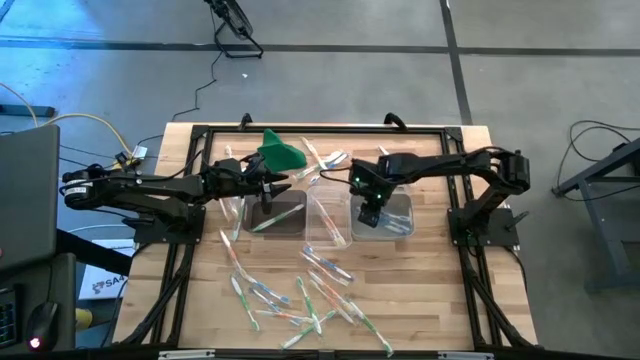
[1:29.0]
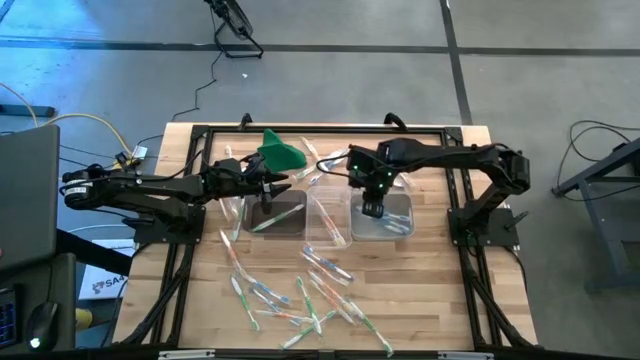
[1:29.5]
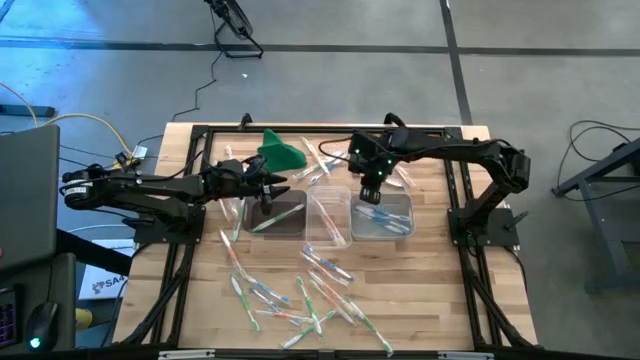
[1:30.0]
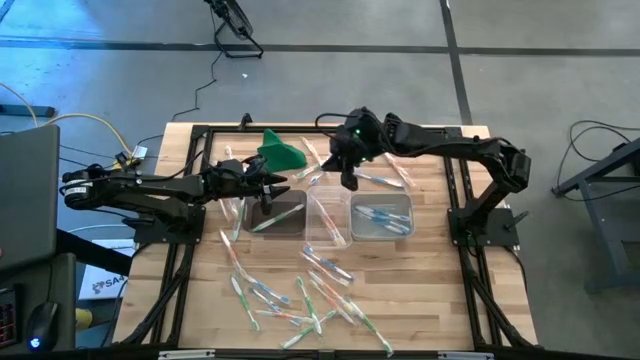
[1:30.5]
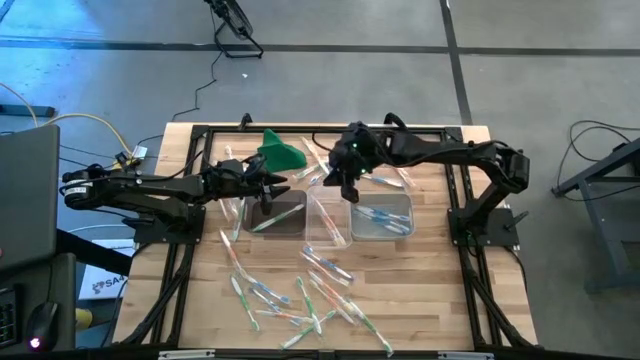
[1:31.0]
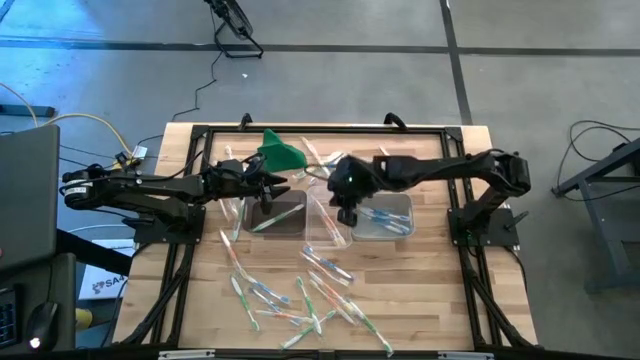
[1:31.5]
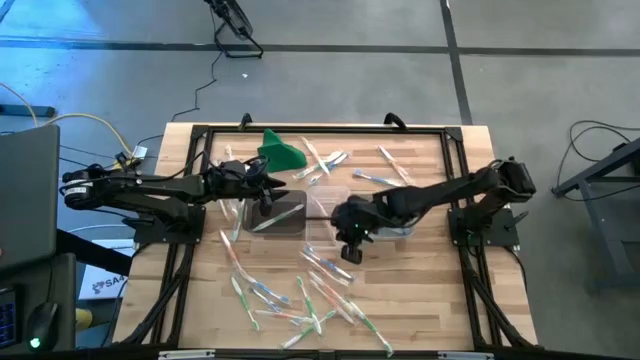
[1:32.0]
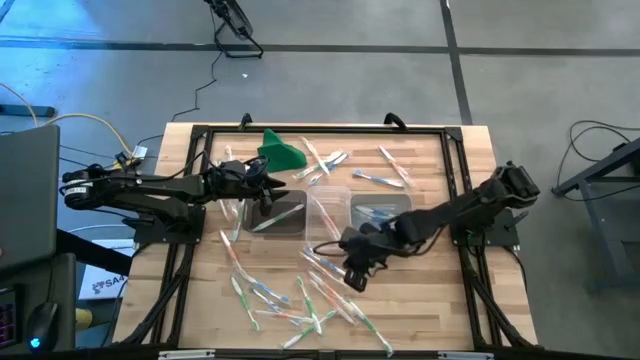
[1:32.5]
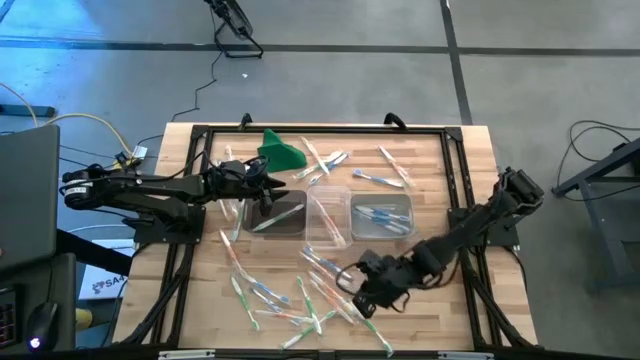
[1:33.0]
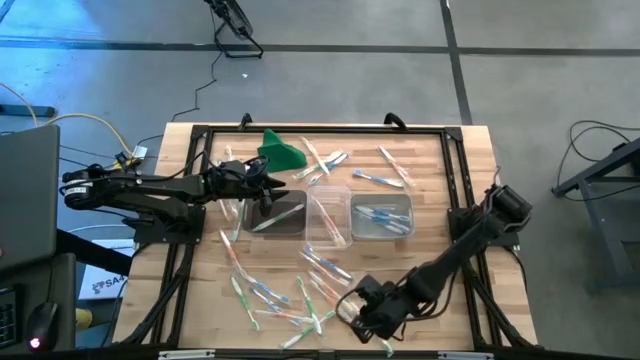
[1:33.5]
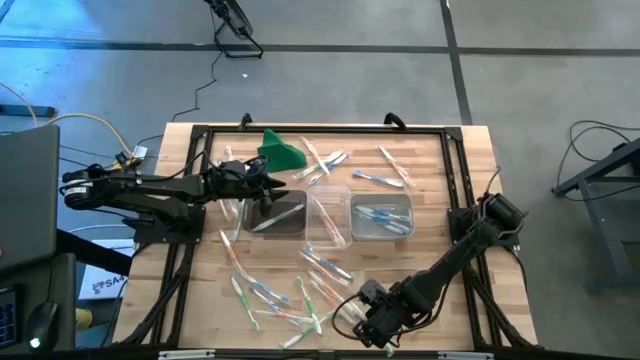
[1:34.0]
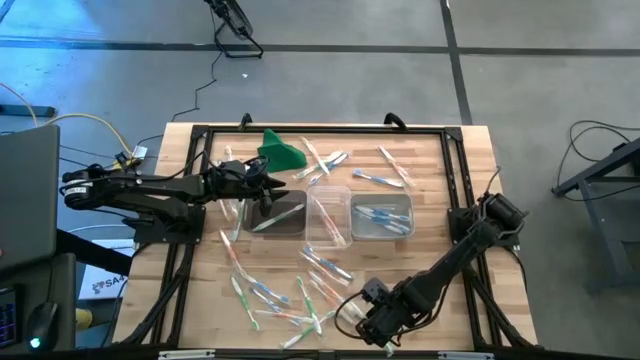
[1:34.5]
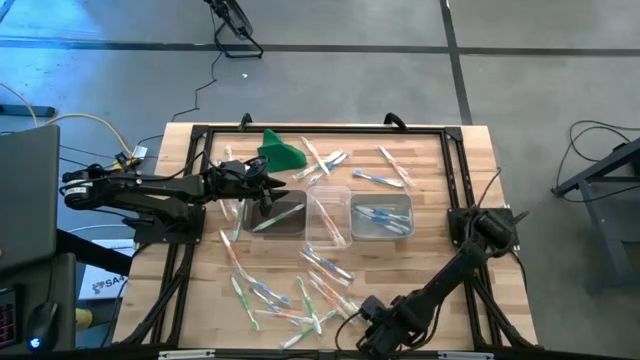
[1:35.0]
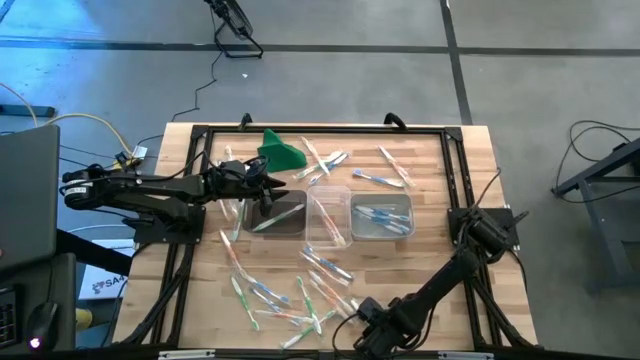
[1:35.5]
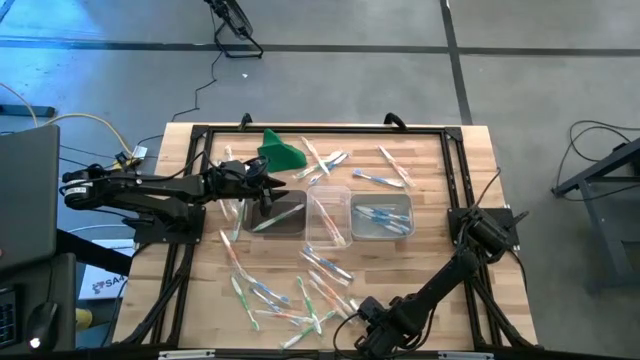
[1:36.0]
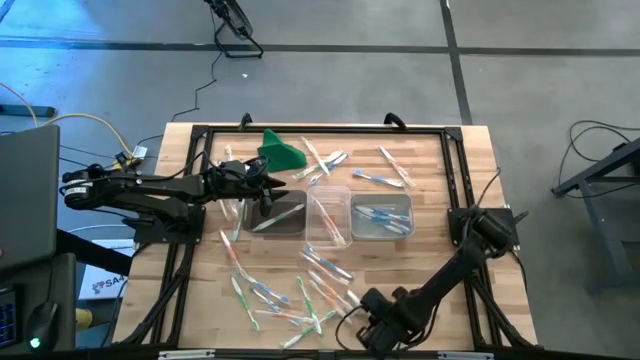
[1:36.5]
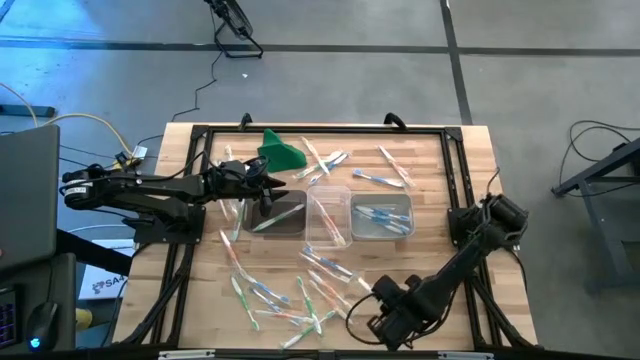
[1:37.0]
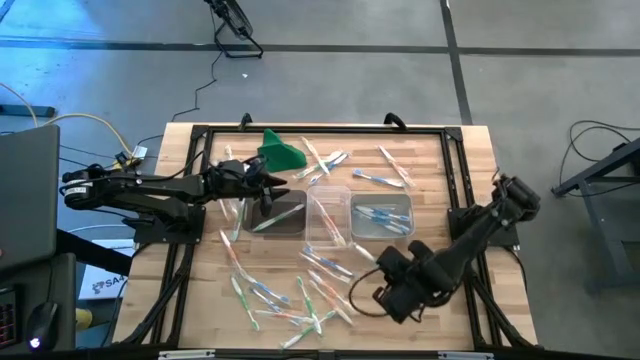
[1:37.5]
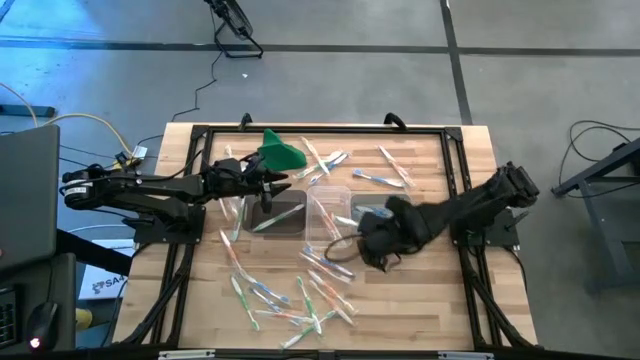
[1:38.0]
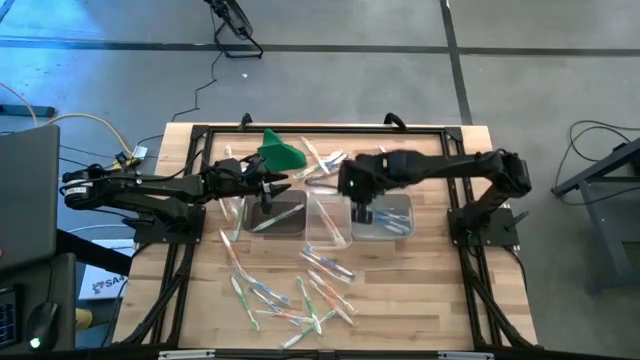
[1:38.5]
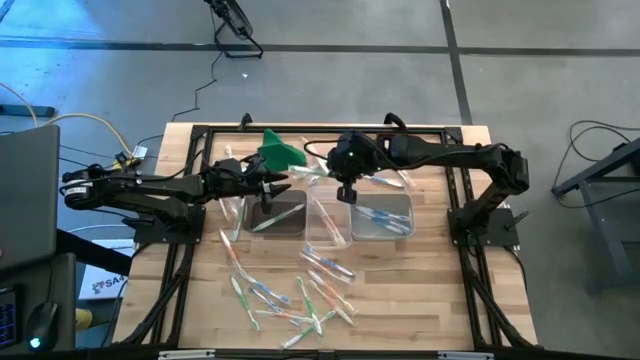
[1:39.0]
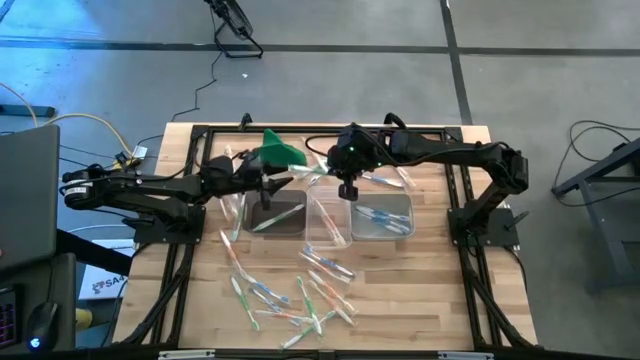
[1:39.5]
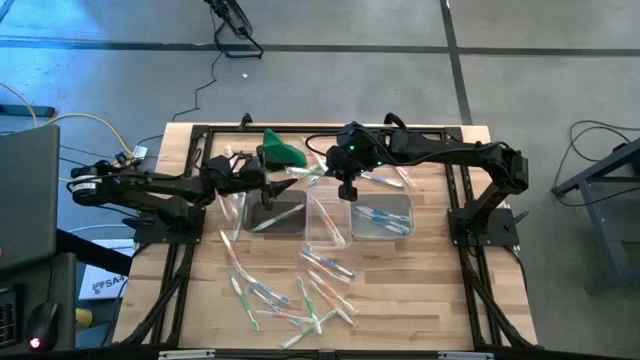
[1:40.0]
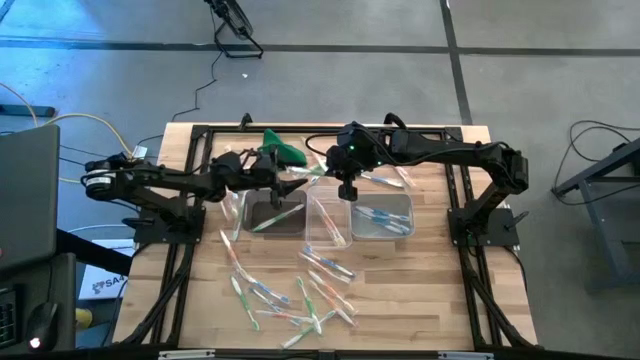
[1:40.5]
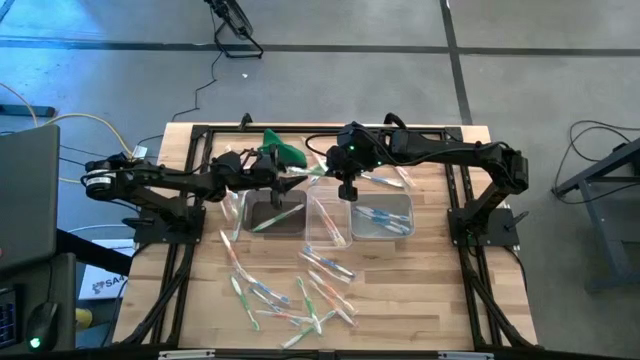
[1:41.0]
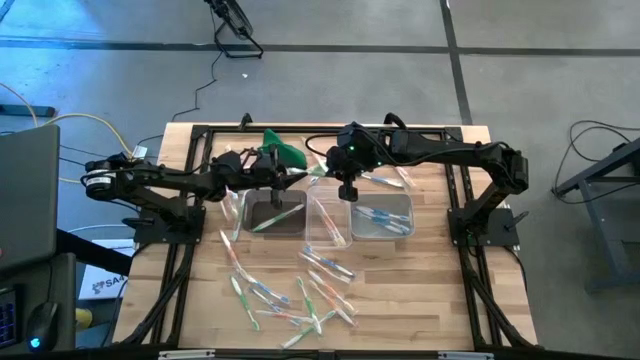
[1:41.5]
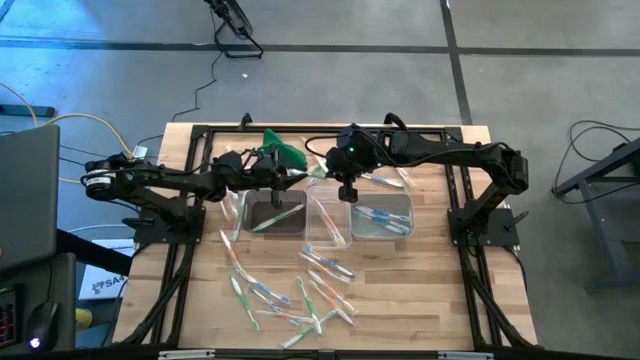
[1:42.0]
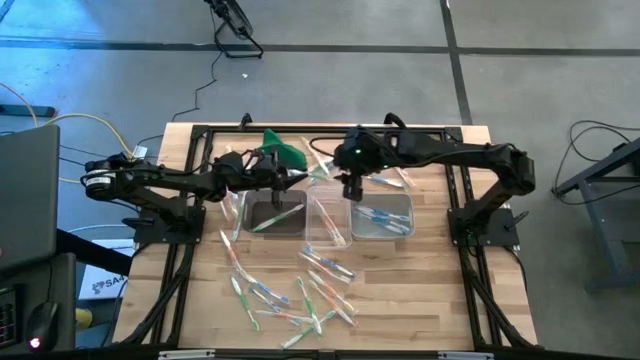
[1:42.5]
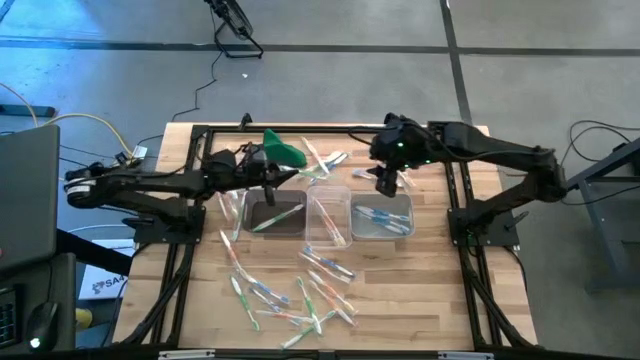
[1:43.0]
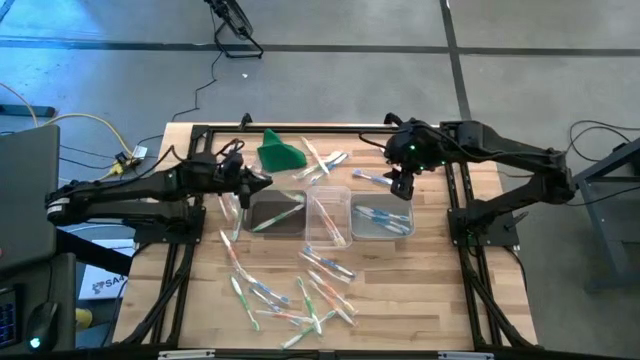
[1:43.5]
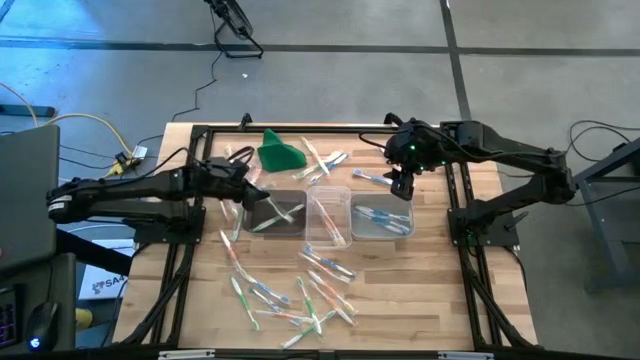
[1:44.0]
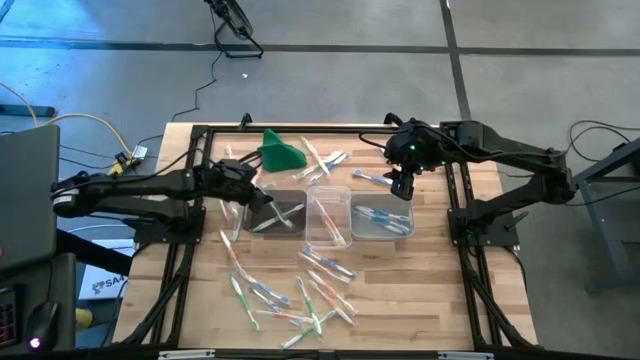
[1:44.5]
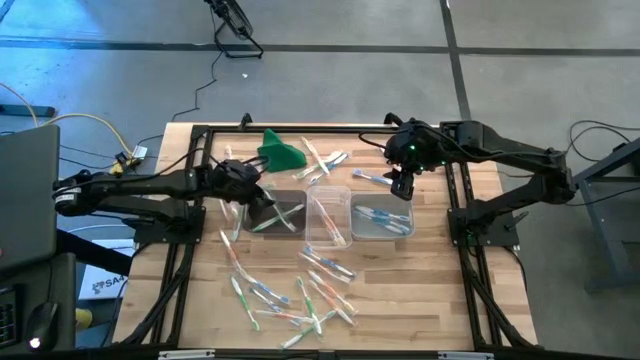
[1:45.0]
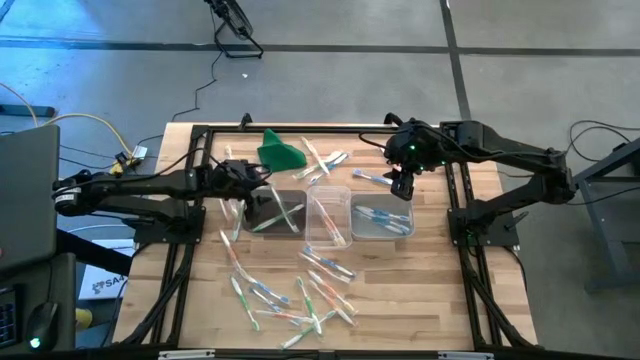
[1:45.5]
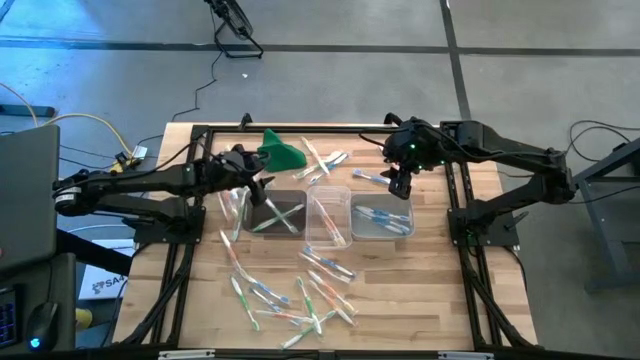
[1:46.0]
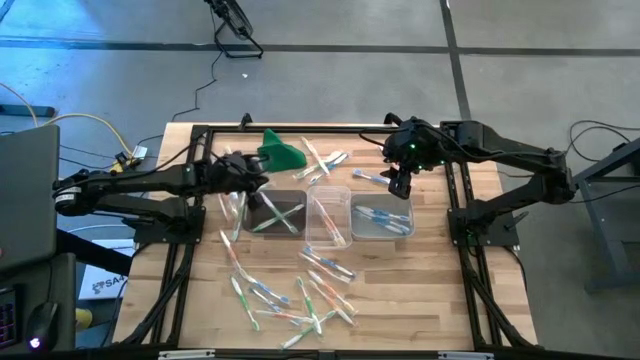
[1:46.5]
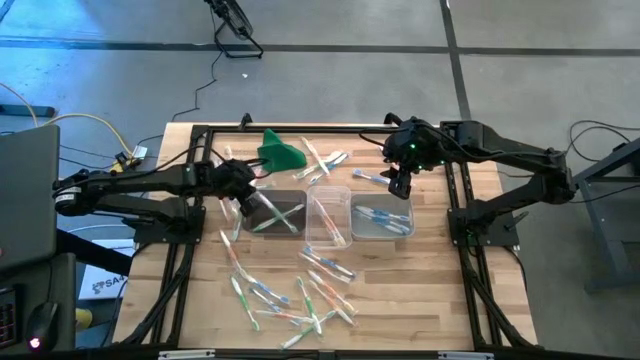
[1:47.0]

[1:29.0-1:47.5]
Task: Pick & Place Toothbrushes
Put the green toothbrush into the black bin

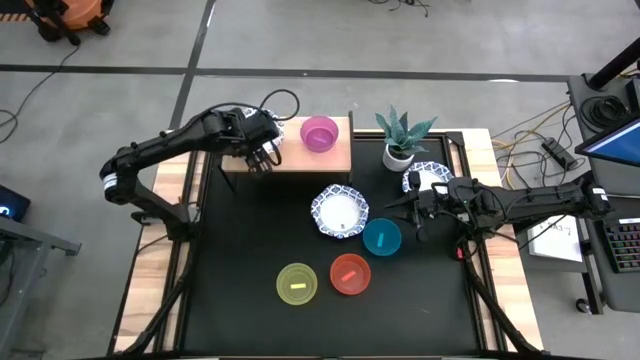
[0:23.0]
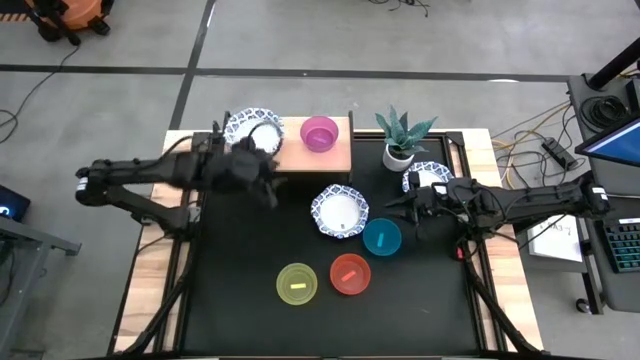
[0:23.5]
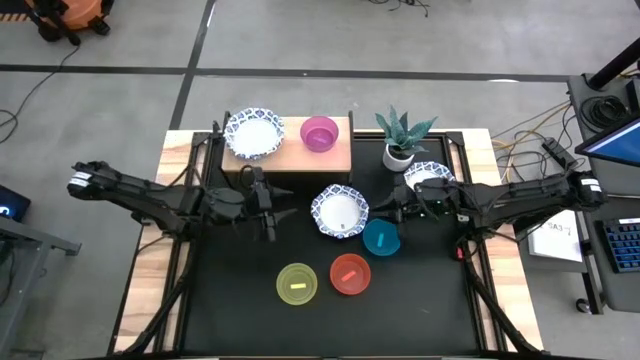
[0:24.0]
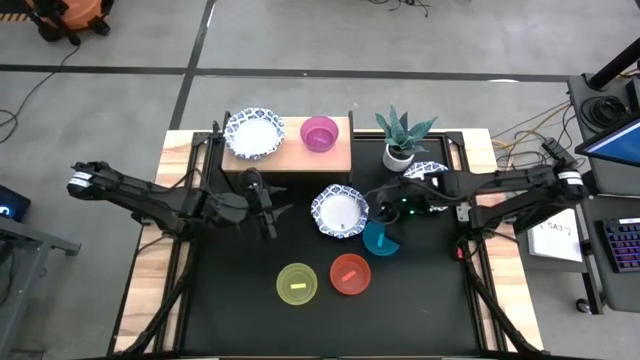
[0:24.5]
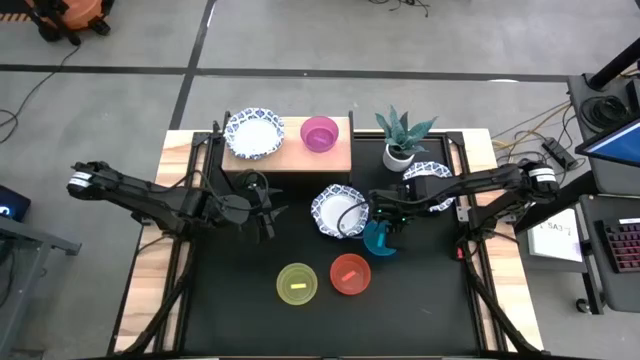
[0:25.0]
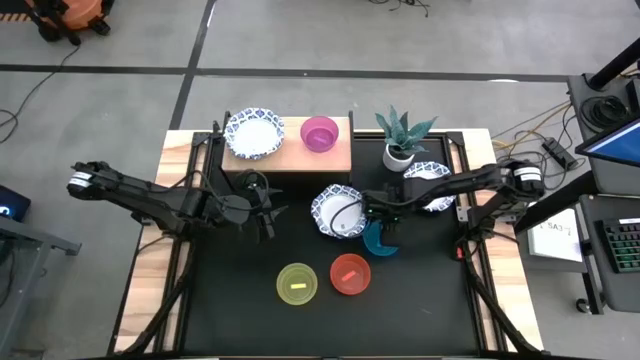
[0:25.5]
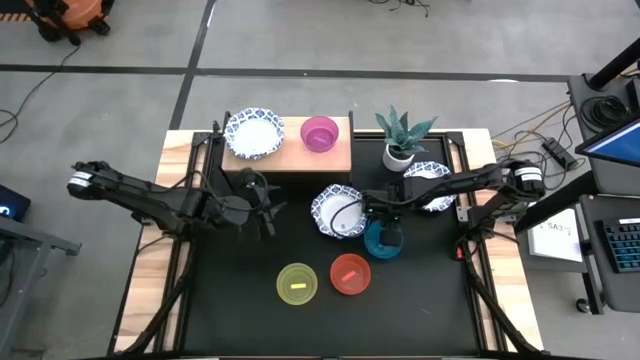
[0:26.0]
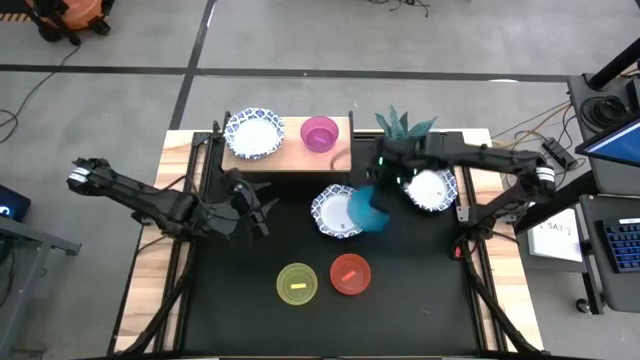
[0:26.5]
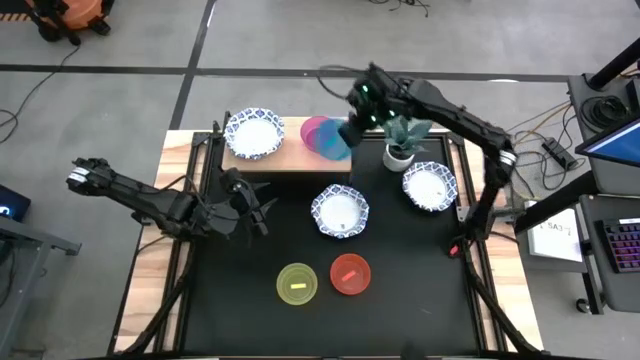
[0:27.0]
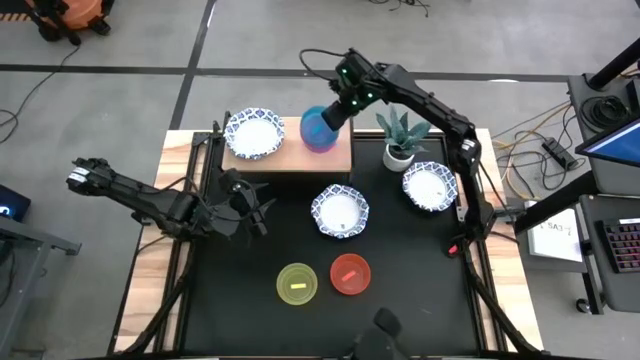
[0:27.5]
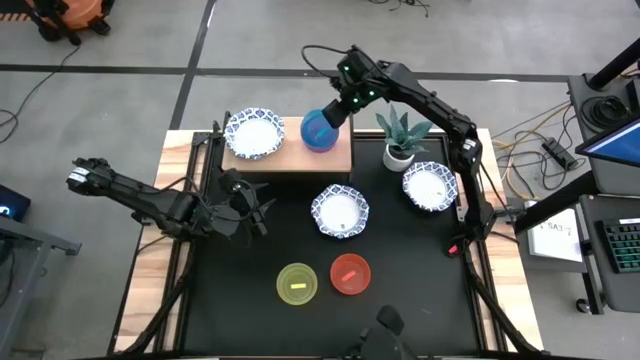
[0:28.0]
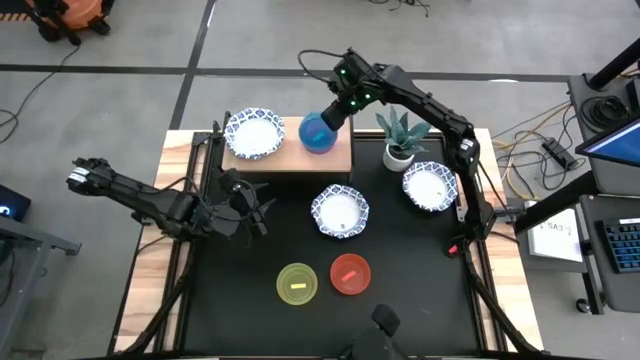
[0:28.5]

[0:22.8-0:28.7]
Task: Place and stack bowls onto a shelf
Stack the blue bowl on top of the purple bowl on the shelf
